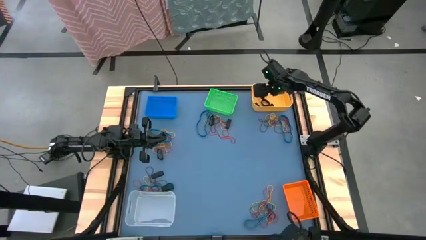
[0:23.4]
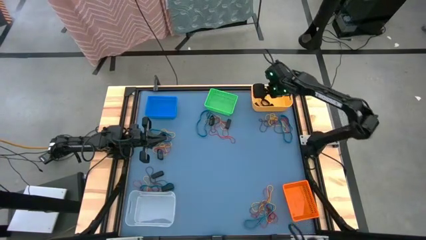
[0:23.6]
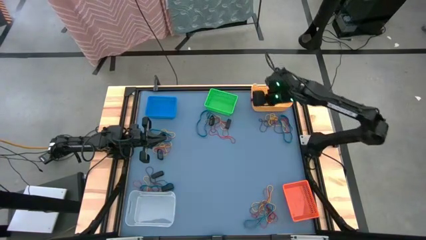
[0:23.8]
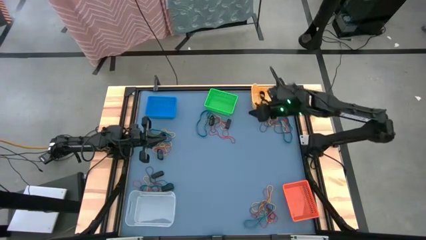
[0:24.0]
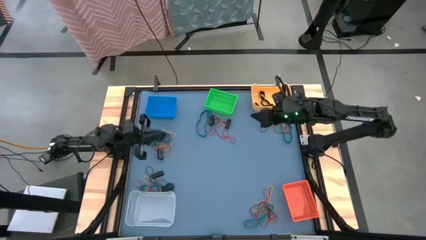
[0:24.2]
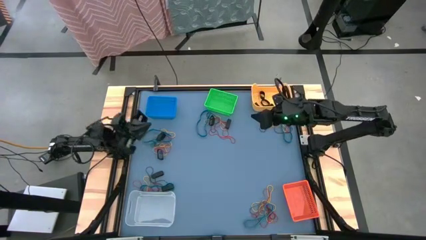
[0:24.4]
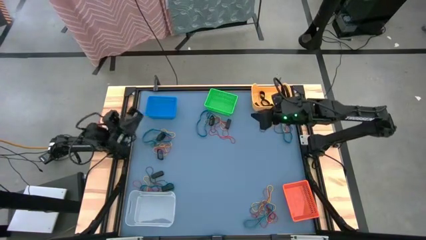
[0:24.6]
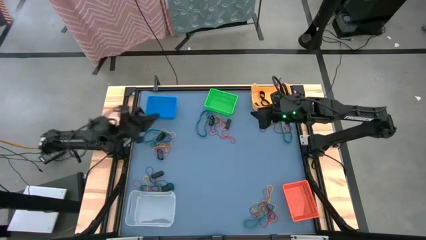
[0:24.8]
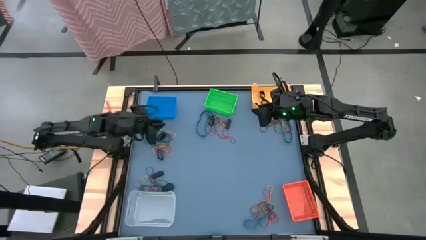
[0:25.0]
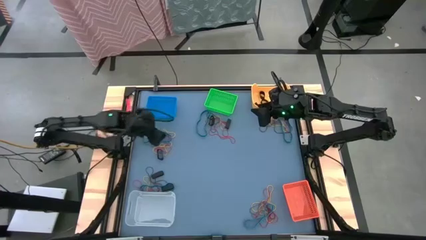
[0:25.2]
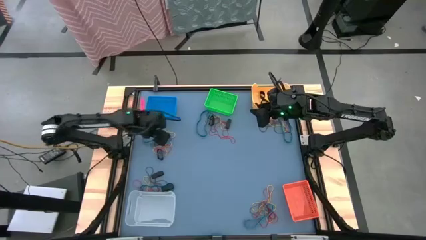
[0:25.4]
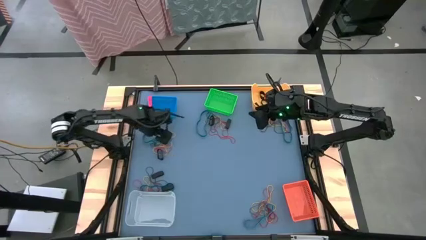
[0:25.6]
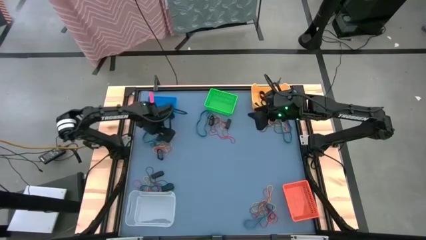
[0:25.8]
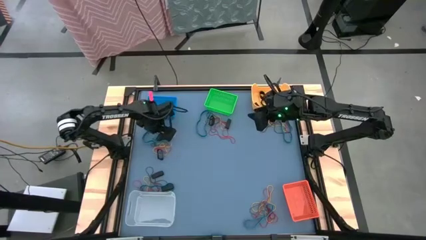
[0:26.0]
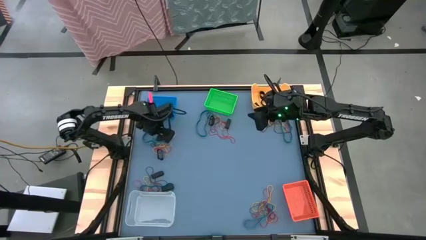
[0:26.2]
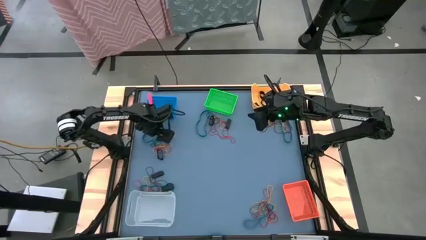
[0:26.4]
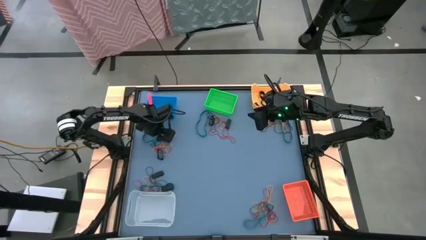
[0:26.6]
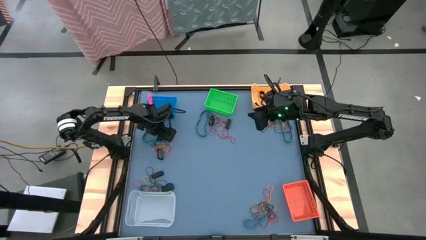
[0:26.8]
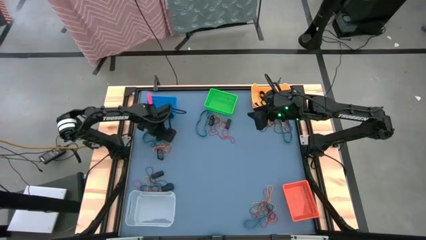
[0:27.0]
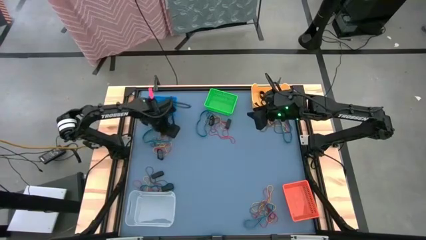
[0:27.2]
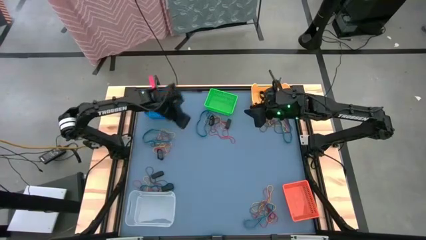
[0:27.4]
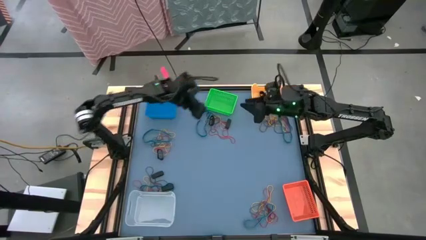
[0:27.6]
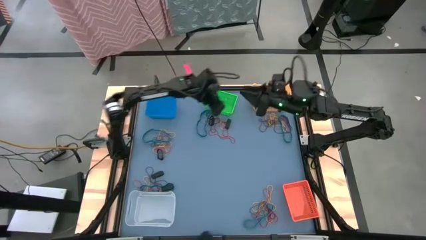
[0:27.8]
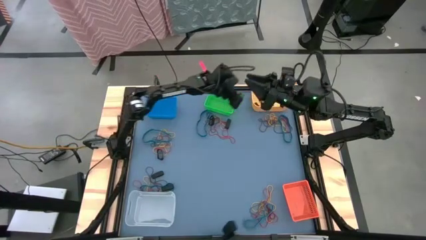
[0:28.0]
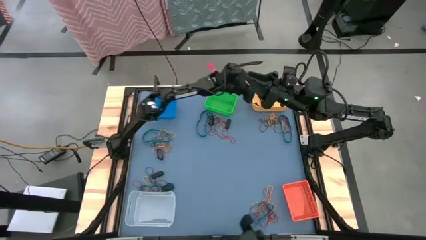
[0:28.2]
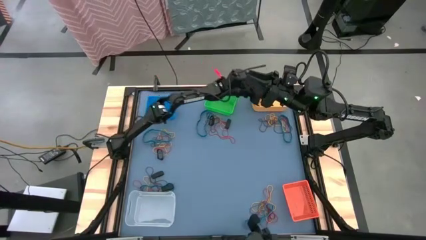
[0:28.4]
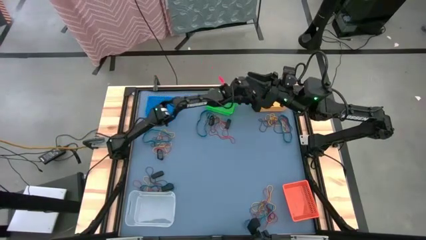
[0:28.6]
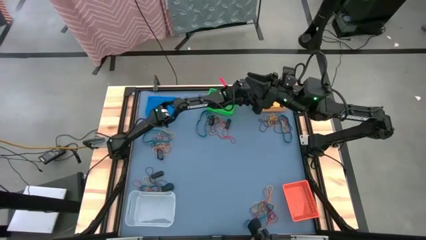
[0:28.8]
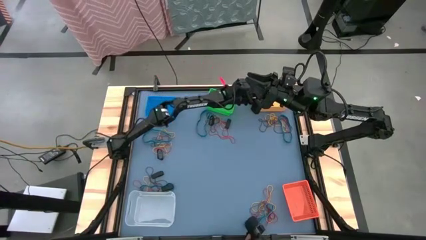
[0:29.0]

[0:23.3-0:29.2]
Task: Sort rubber bands into baskets
Put the black rubber band into the yellow bin

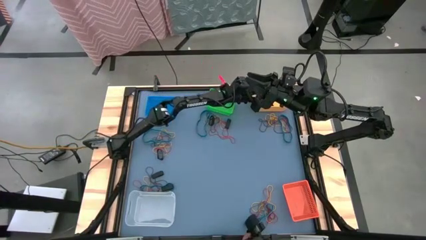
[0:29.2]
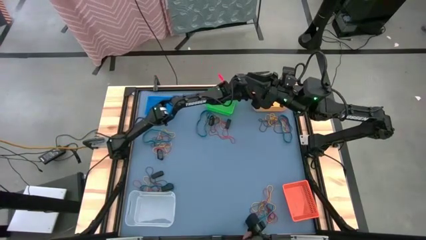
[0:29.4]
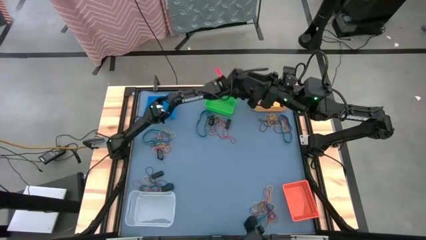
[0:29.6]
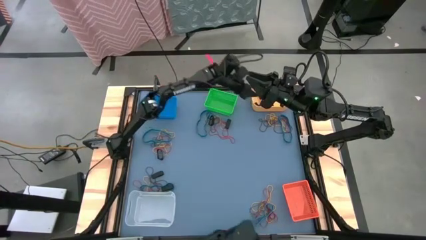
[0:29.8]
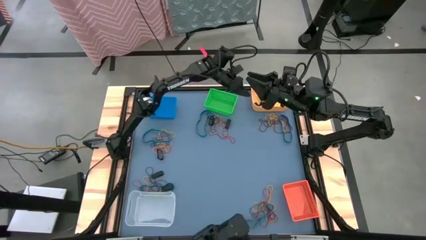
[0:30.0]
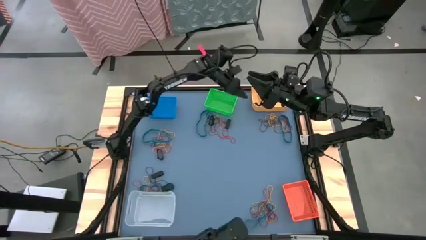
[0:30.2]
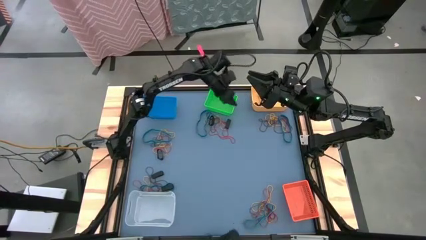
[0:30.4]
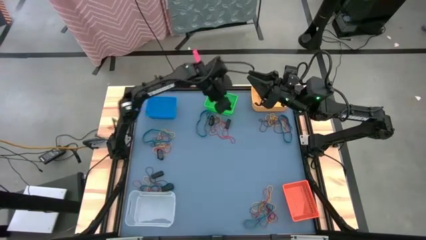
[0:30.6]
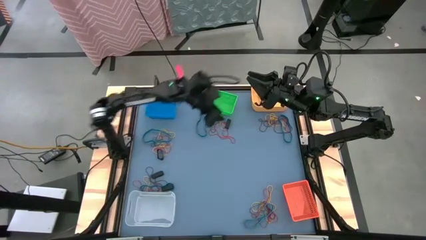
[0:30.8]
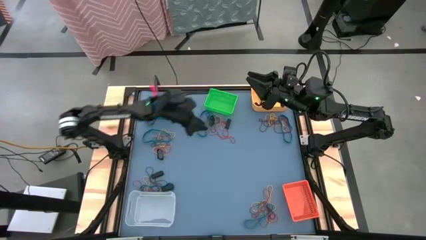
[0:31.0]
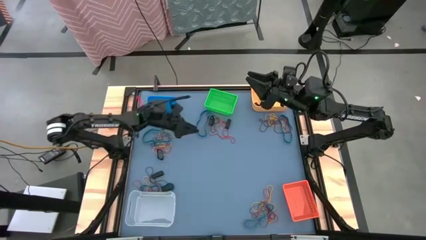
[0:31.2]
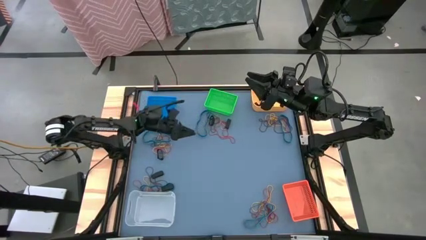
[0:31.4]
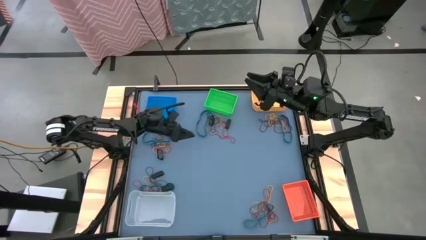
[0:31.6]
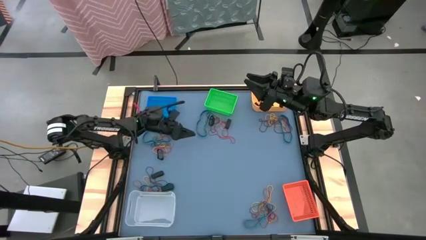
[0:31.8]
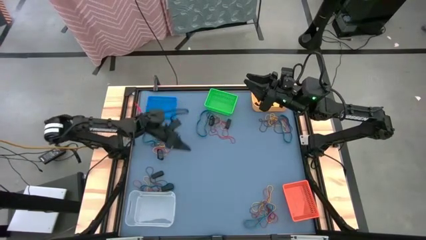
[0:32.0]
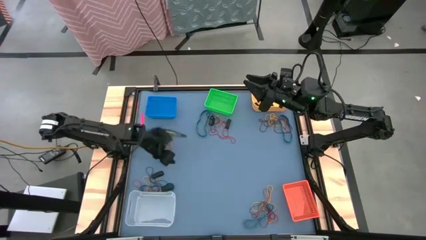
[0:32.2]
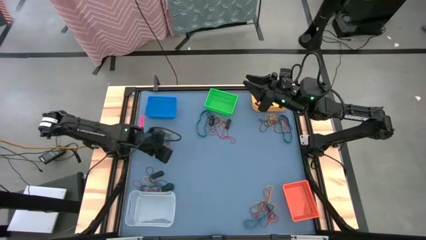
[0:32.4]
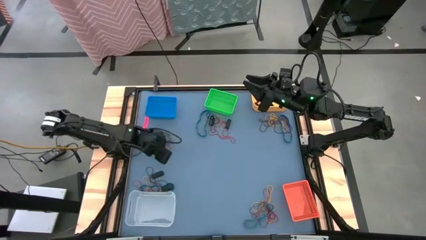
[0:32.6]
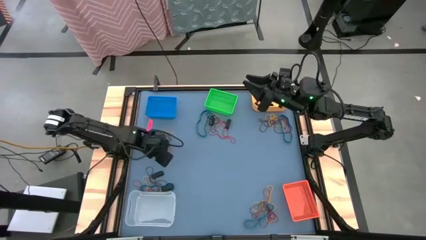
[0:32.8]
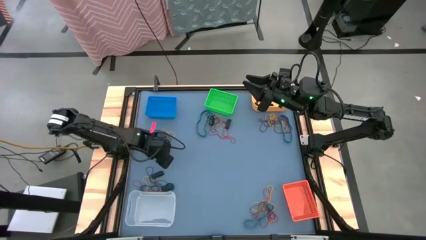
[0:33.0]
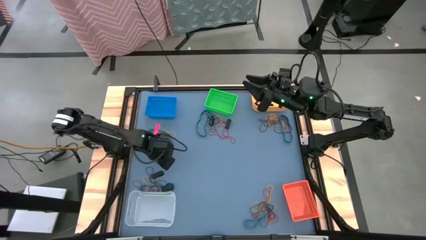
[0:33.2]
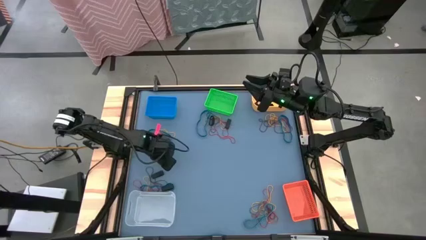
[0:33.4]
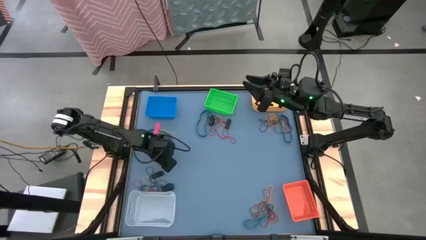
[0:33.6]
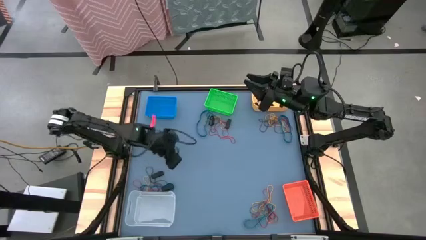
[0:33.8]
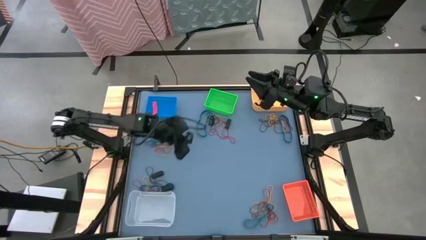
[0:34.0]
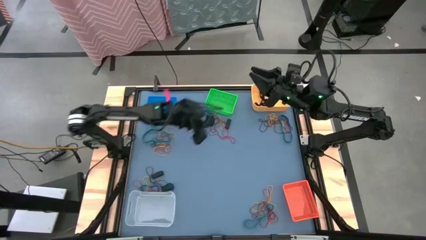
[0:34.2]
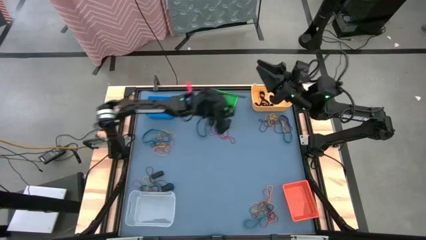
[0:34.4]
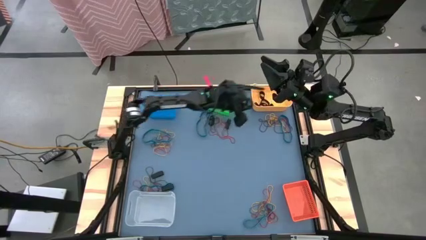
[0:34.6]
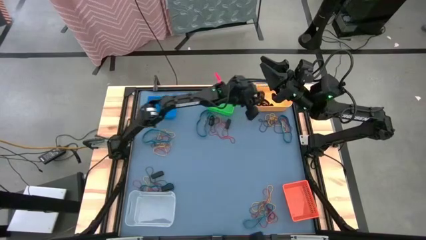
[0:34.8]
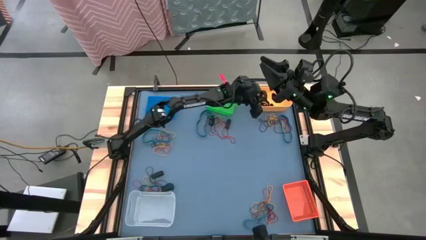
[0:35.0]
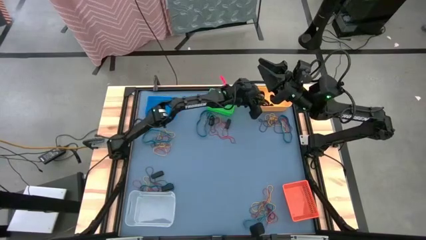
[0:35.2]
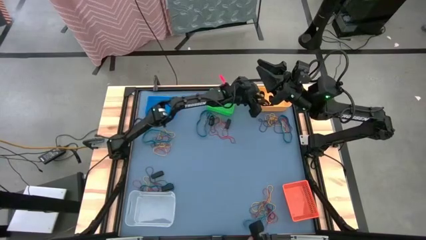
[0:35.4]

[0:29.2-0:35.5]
Put the black rubber band into the yellow bin

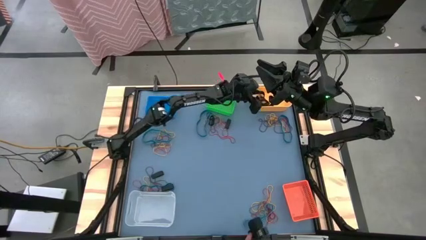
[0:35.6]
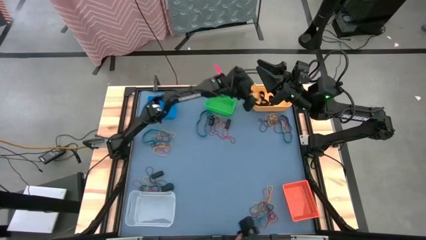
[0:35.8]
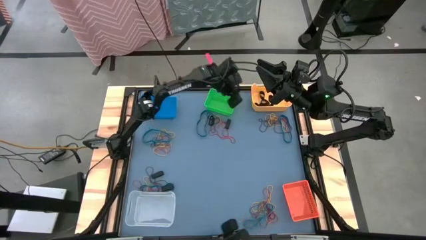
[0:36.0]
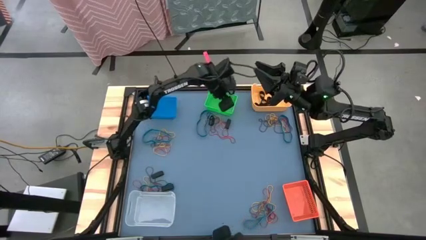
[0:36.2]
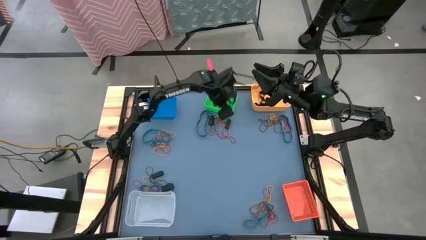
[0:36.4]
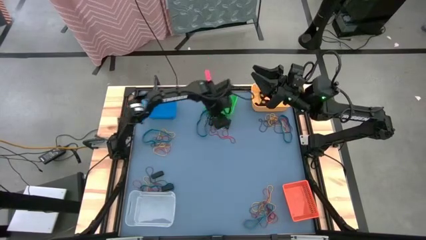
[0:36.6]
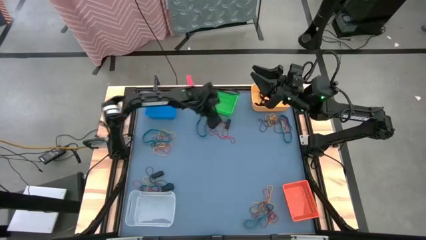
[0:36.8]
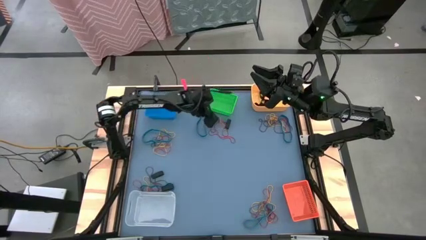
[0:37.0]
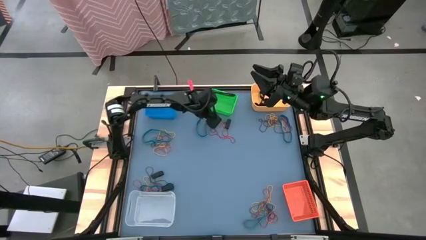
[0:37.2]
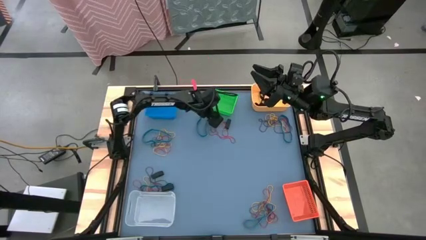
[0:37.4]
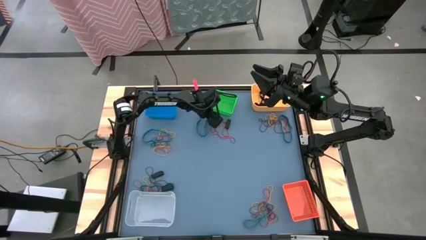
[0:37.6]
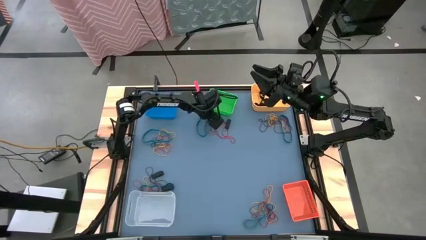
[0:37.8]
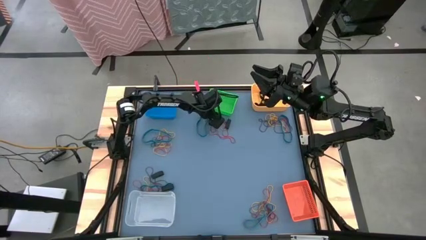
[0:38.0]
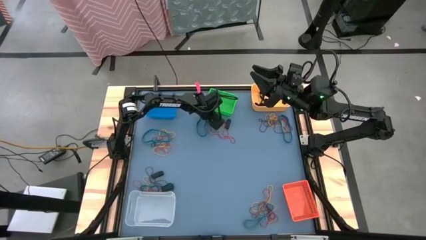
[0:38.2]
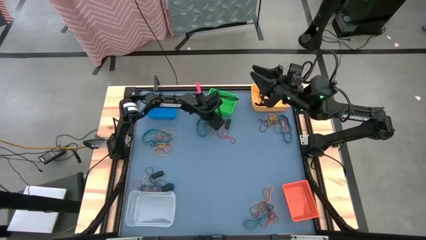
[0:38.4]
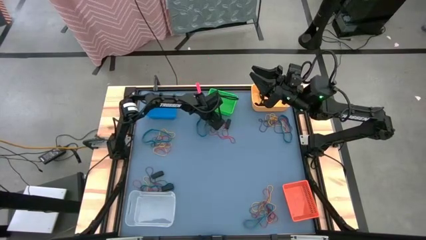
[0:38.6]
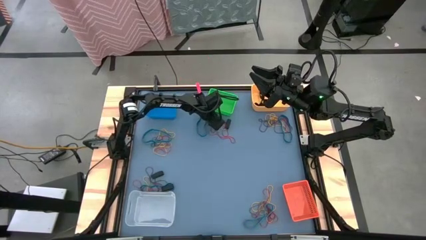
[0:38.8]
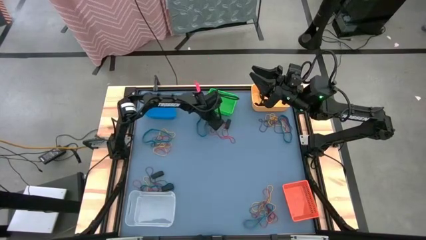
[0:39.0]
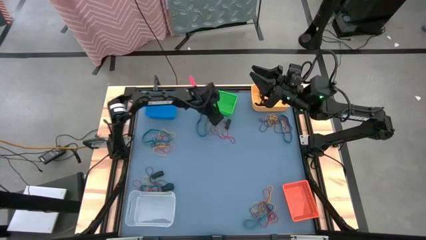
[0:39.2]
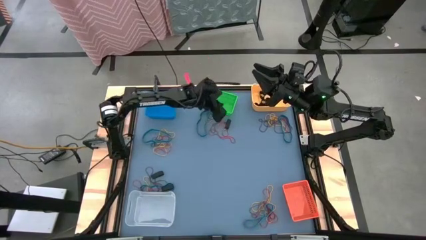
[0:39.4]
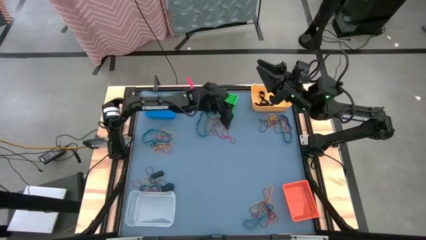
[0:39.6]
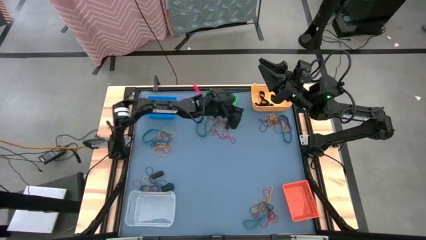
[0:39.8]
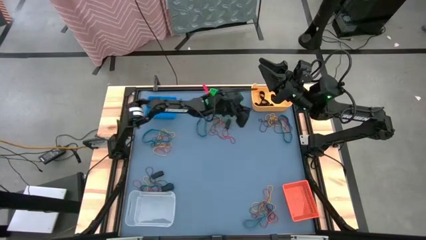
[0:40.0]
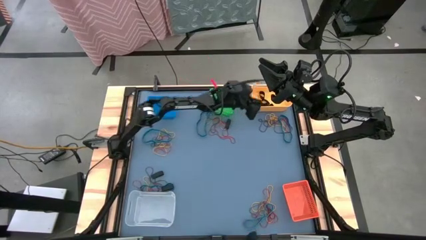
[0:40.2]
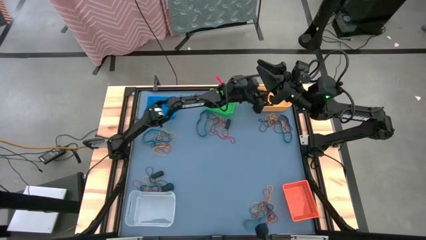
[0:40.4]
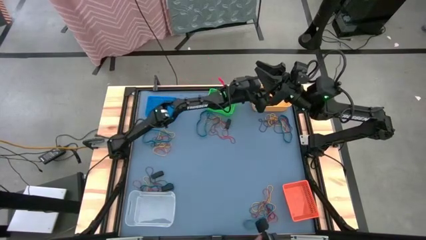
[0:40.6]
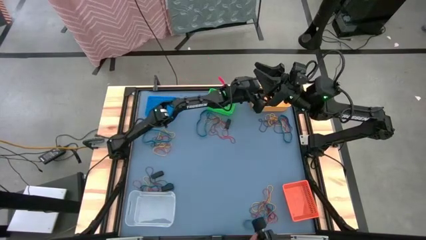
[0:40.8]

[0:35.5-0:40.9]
Put the black rubber band into the yellow bin
